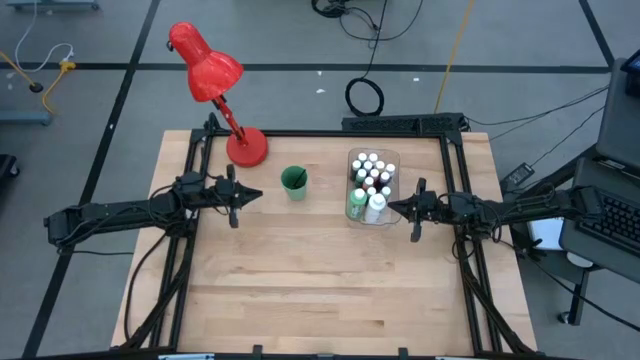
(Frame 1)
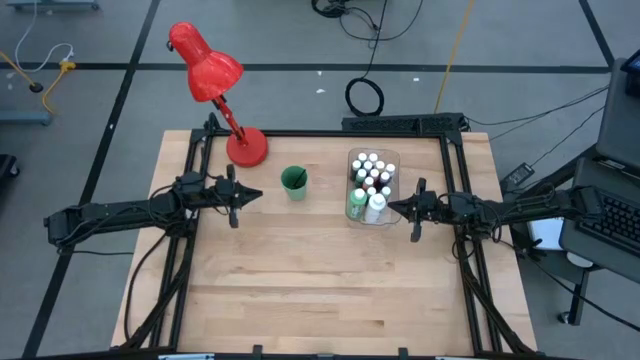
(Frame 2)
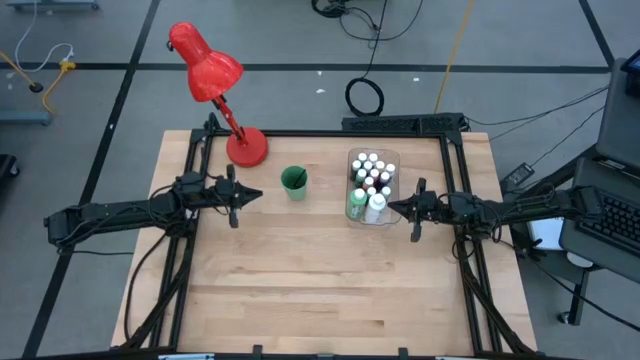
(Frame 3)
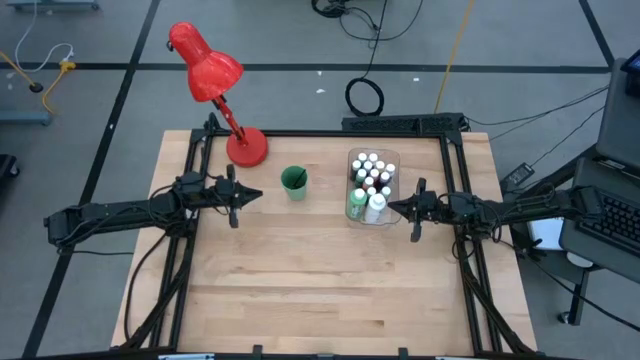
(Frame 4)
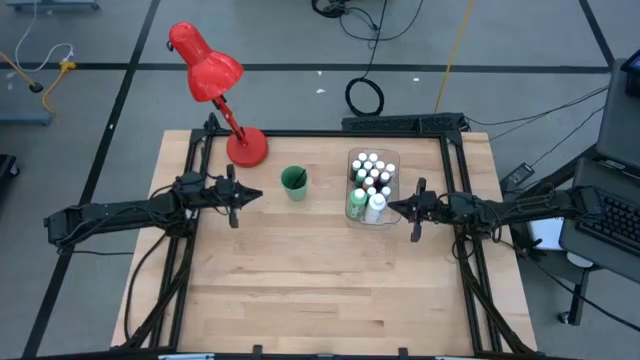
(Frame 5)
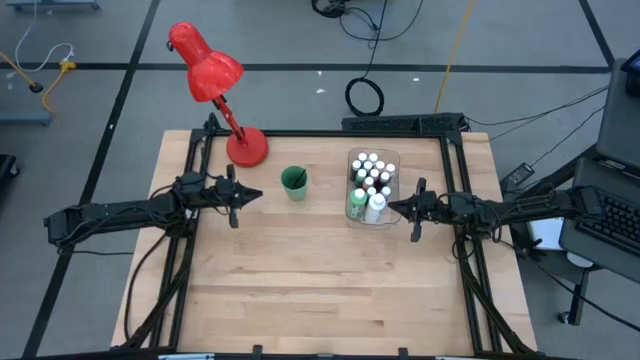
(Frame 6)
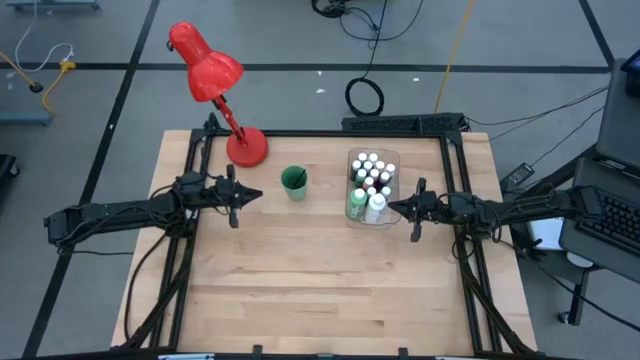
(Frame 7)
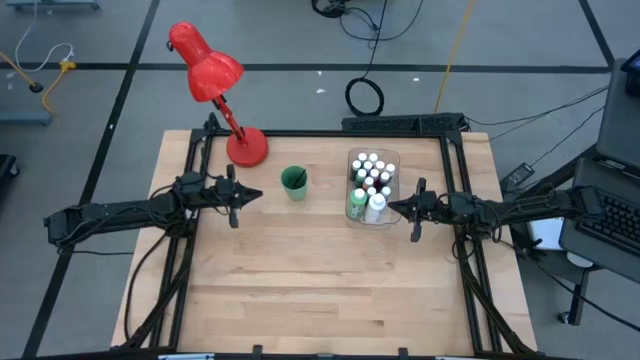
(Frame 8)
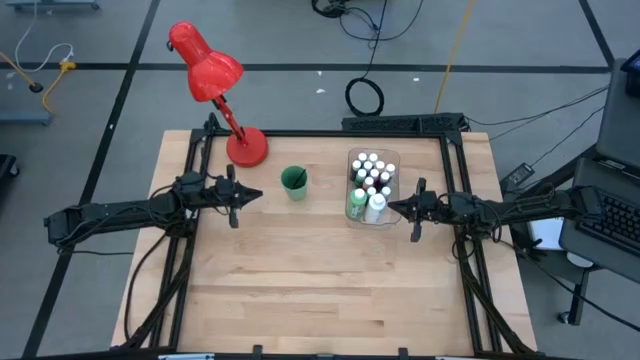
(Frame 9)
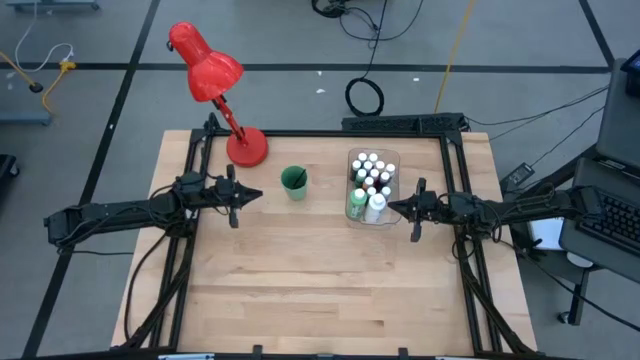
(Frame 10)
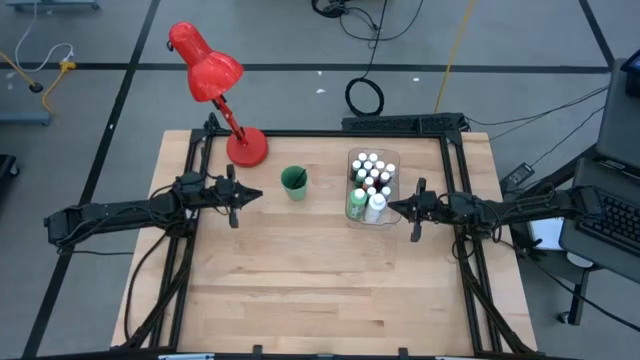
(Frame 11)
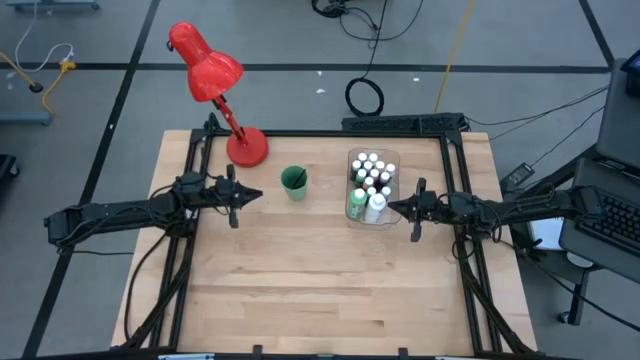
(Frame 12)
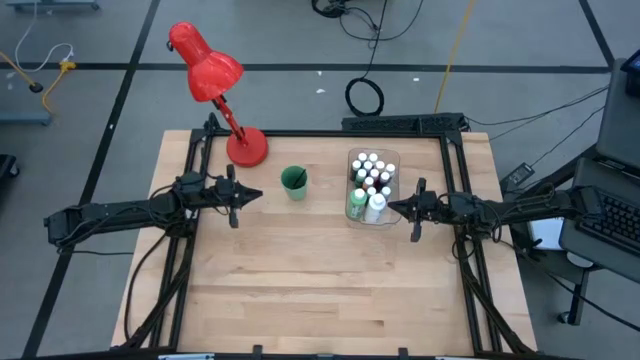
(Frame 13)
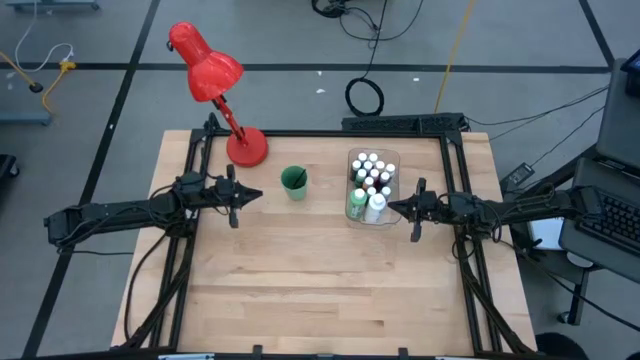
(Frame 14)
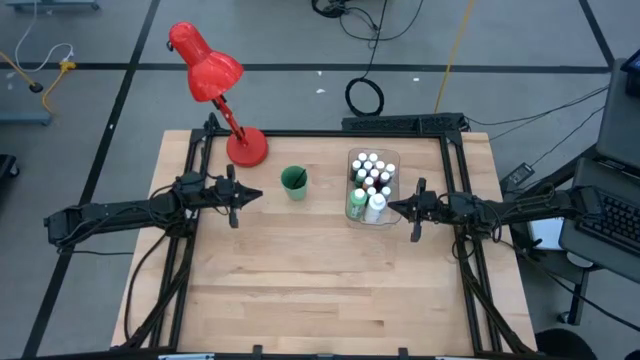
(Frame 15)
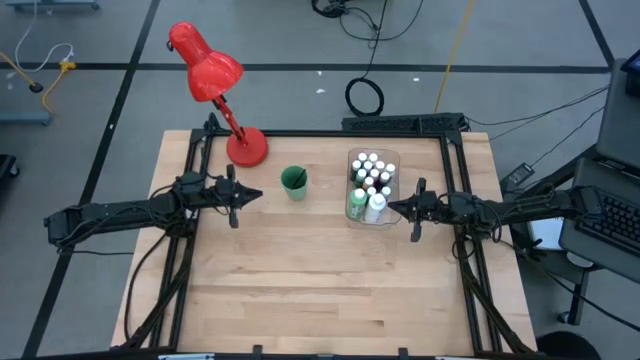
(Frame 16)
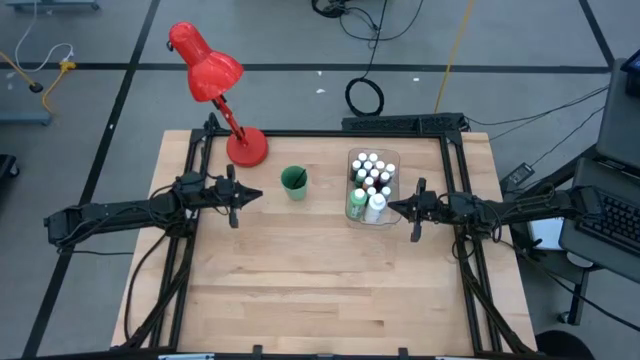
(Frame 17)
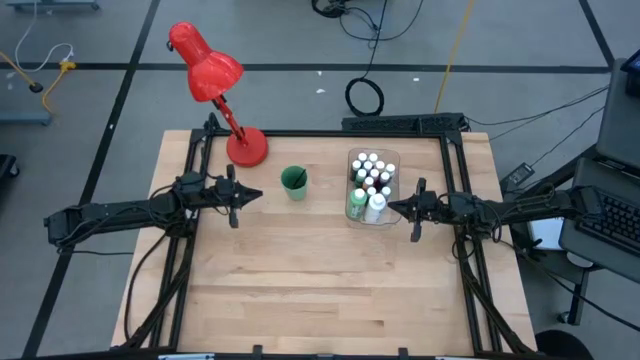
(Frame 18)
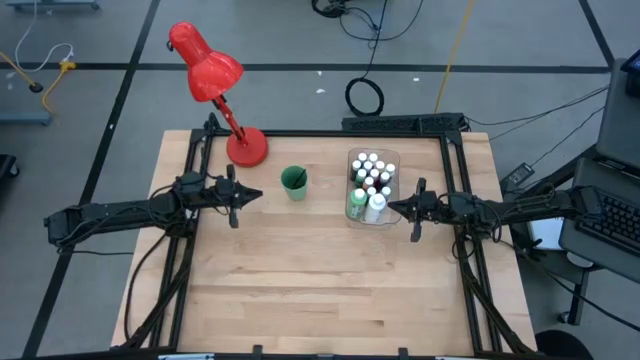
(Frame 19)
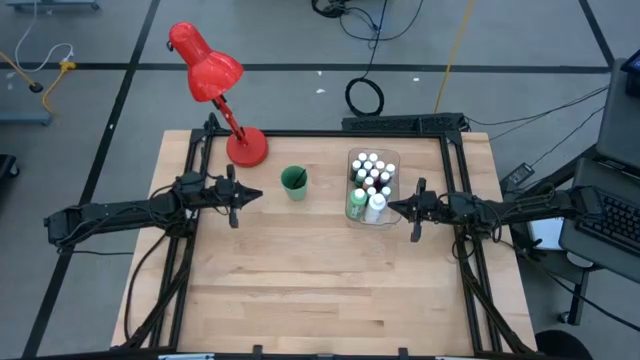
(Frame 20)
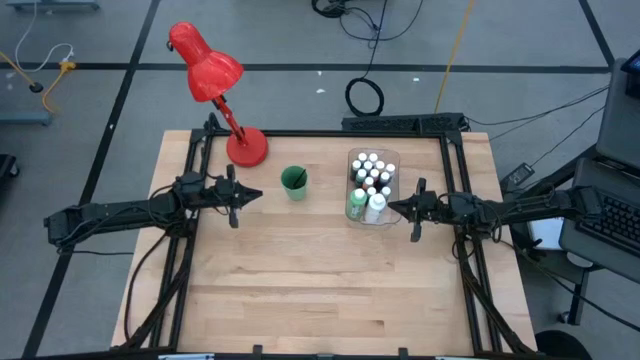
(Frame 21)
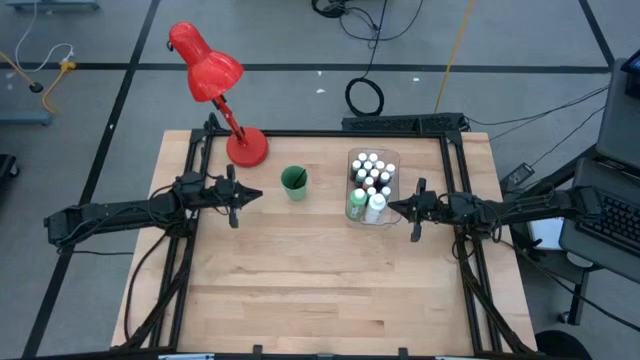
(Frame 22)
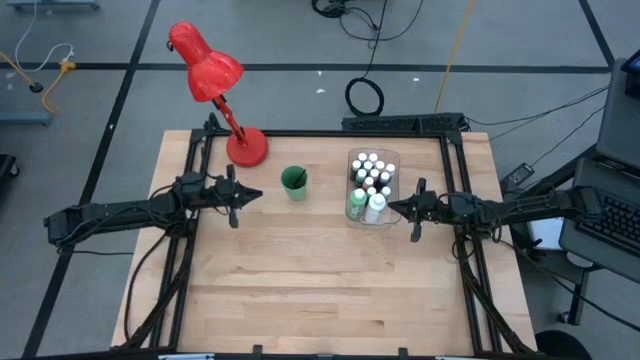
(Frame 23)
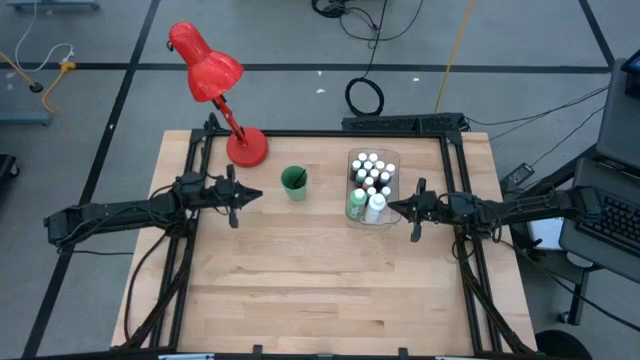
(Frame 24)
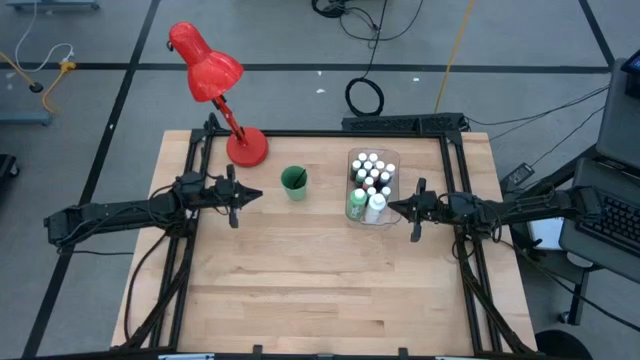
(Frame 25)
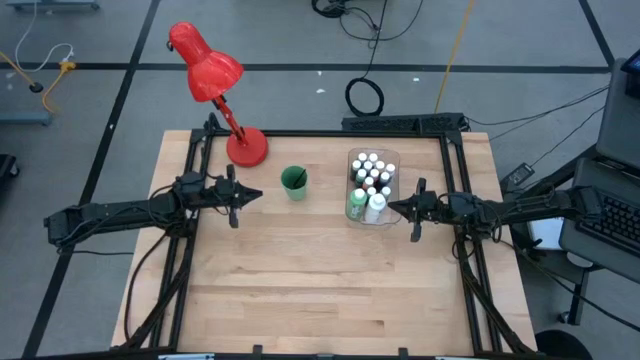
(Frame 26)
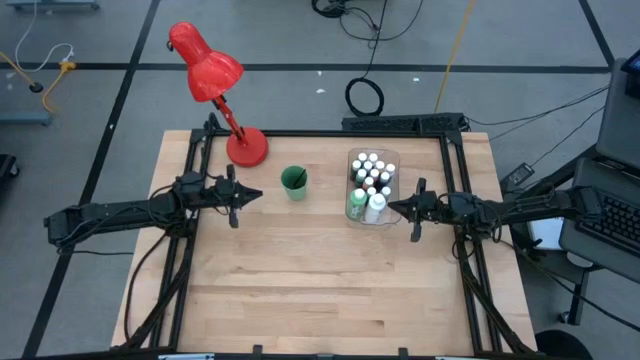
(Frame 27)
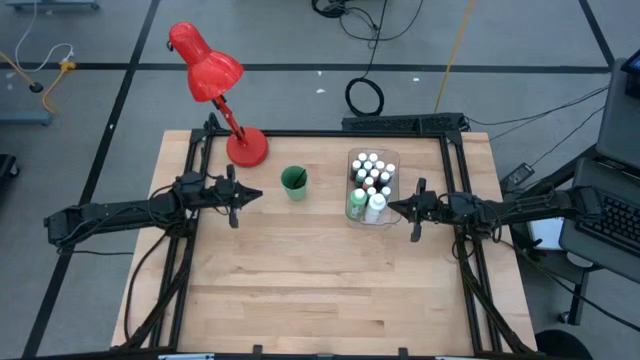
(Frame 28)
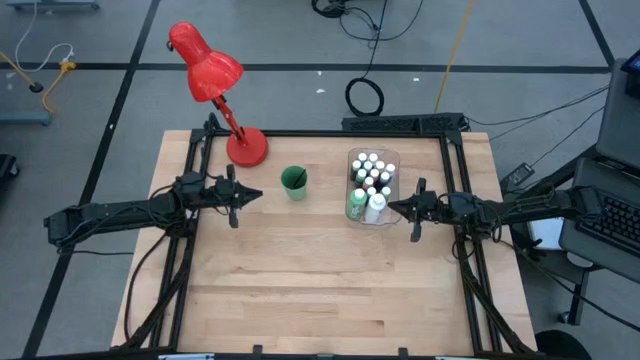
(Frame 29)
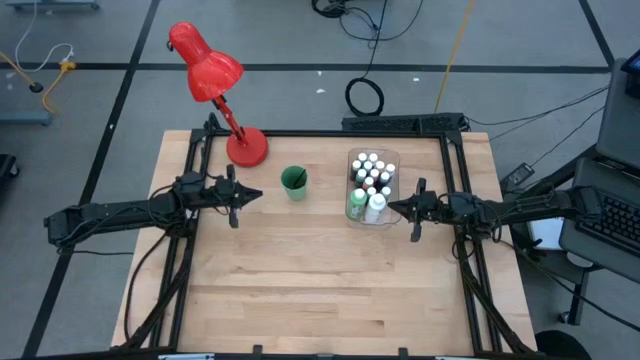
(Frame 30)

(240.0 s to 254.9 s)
Task: Pick & Place Paint Supplies
Return to Home Position

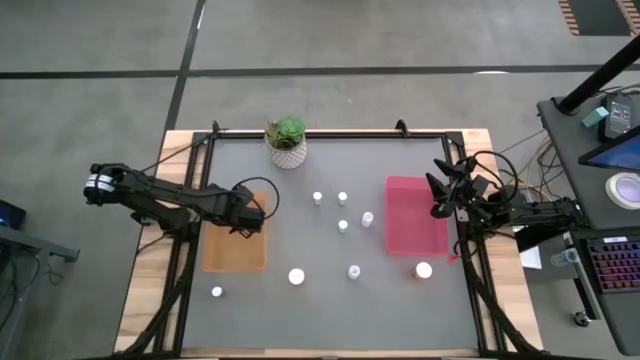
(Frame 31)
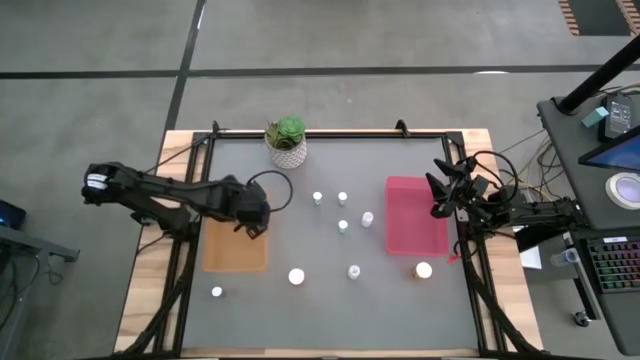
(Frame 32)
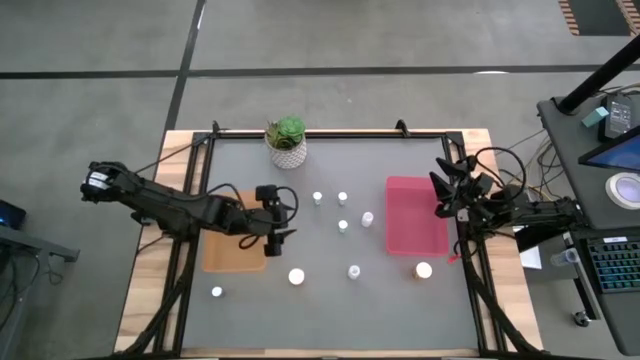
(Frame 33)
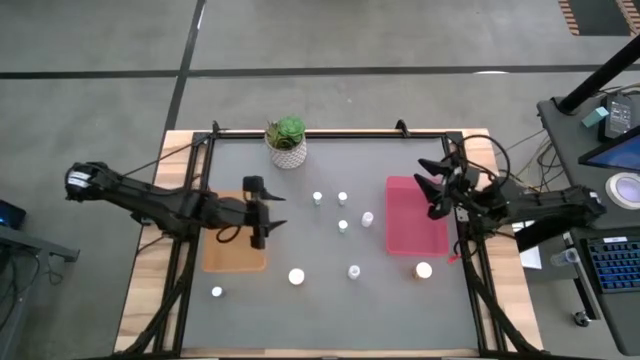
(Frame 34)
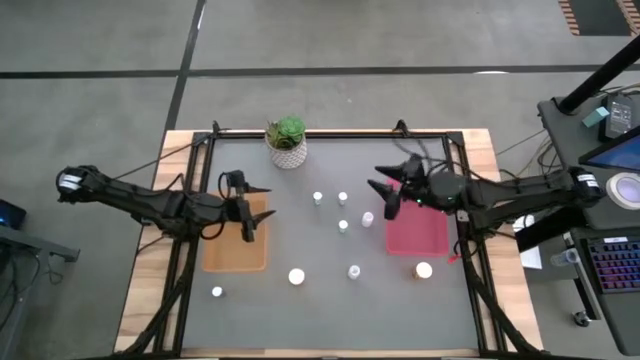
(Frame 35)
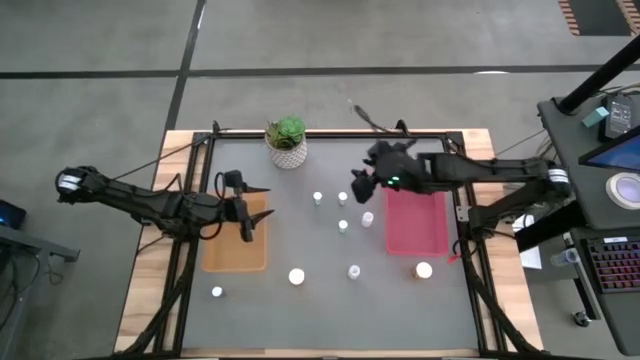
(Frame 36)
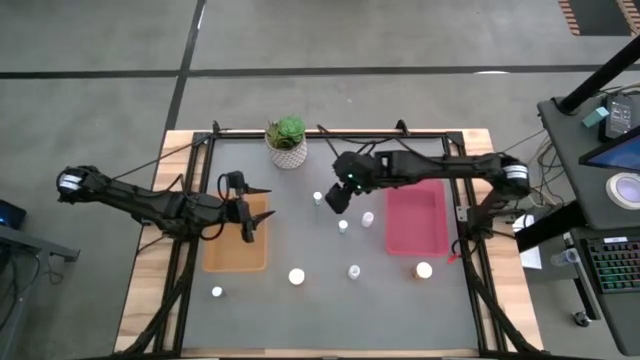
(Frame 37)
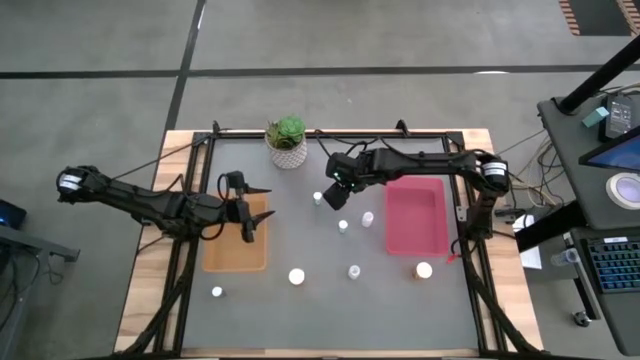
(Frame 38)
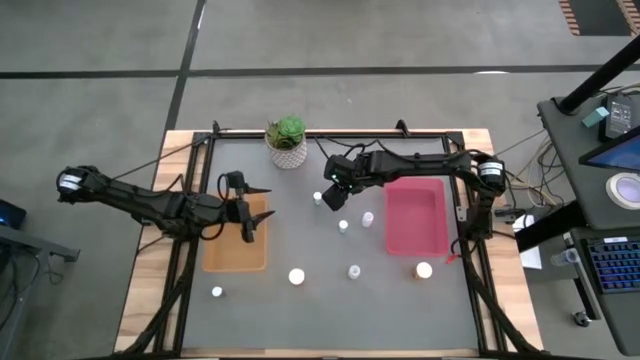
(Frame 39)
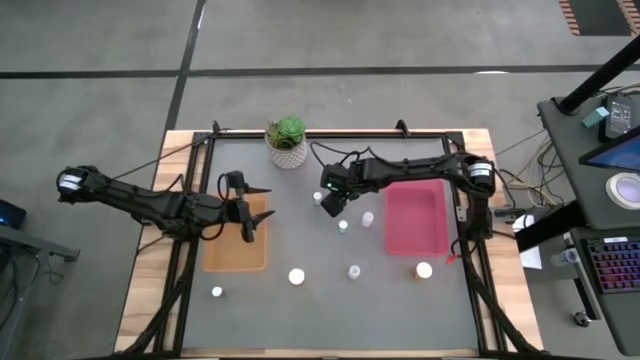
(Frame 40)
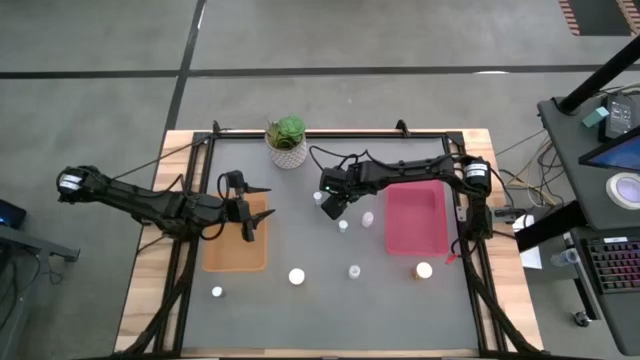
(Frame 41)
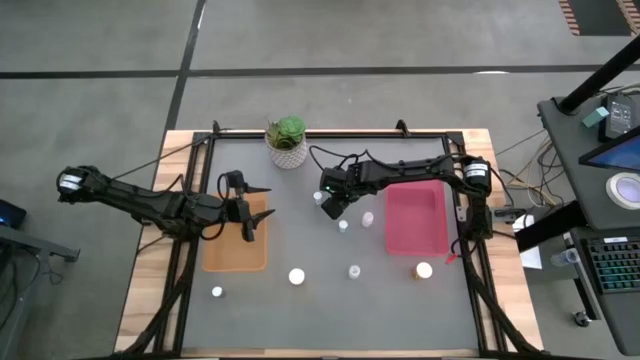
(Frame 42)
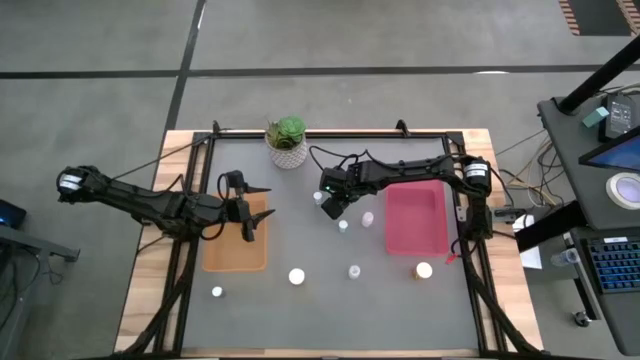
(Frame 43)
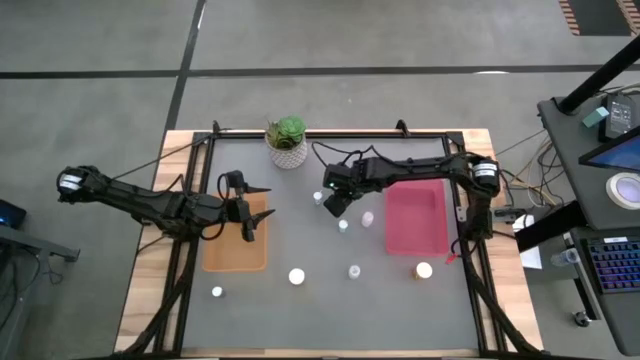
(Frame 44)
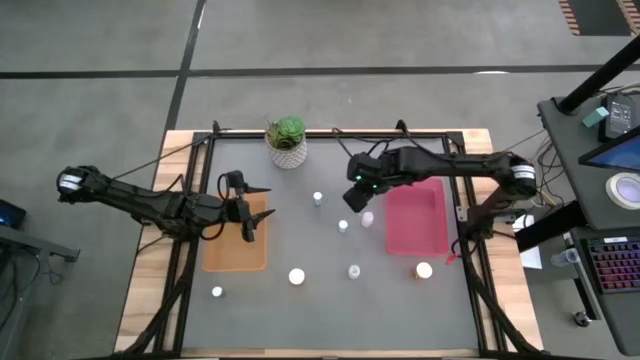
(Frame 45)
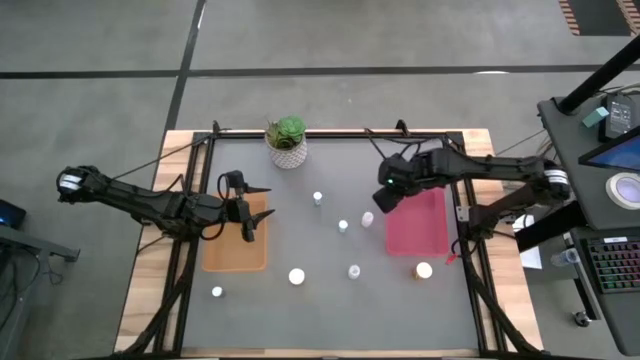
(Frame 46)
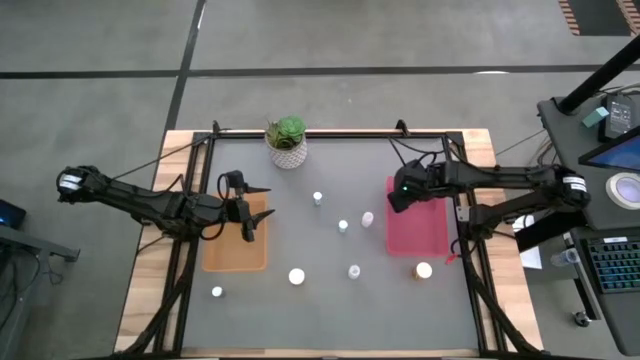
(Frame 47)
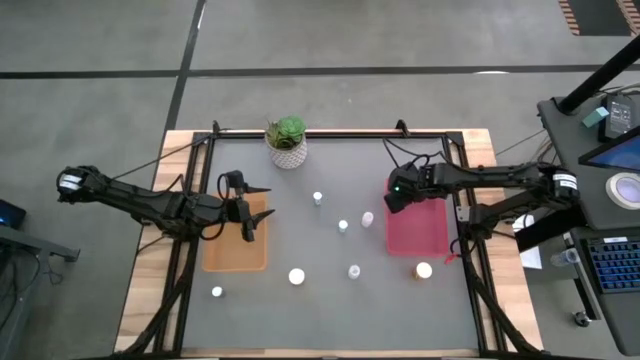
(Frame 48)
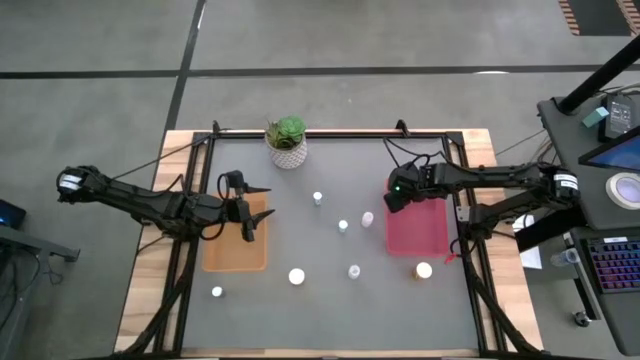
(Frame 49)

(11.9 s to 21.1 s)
Task: Pick and place medicine bottles into bin by pill shape (circle, oval)
Put the blue tablet bottle into the pink bin
